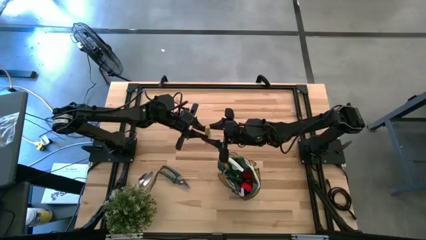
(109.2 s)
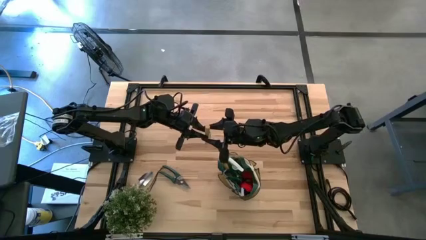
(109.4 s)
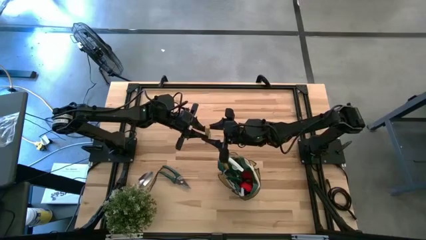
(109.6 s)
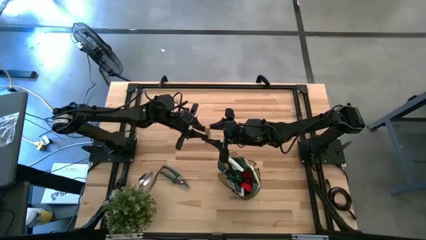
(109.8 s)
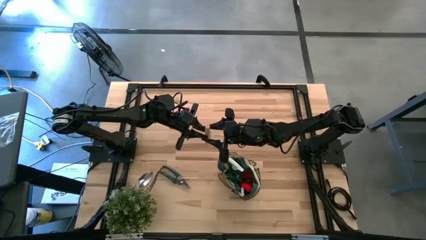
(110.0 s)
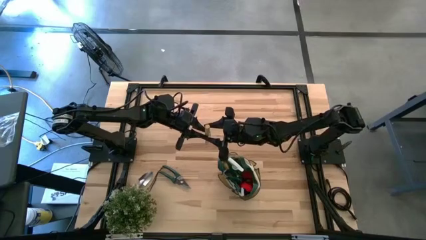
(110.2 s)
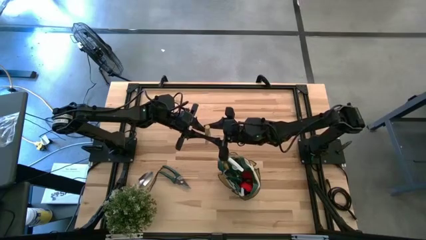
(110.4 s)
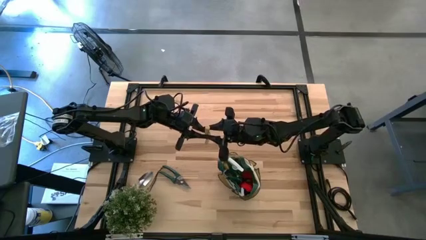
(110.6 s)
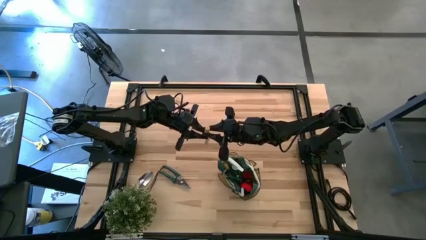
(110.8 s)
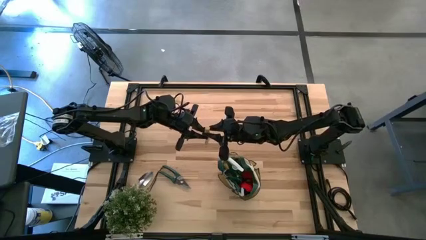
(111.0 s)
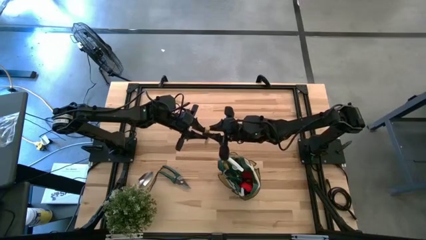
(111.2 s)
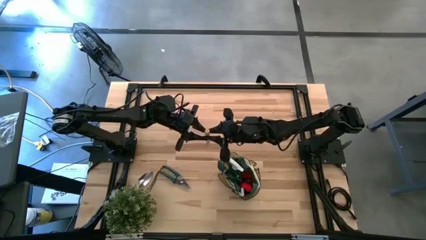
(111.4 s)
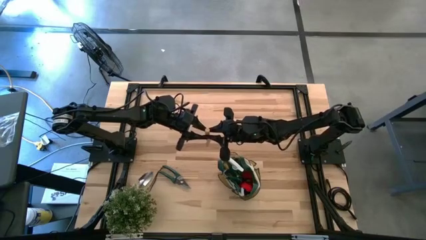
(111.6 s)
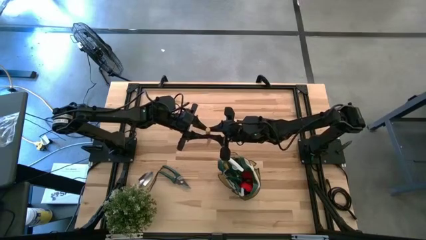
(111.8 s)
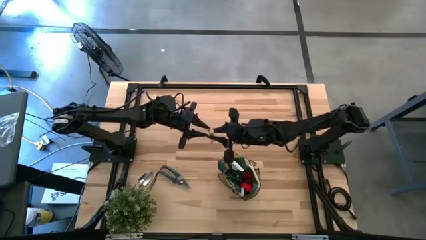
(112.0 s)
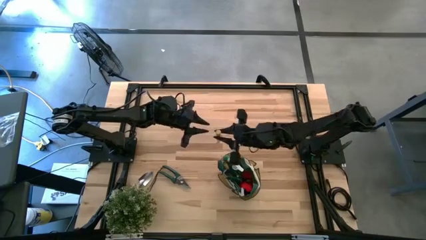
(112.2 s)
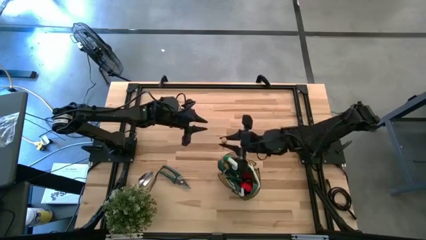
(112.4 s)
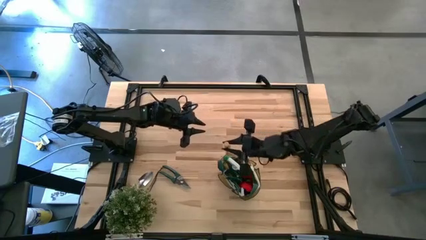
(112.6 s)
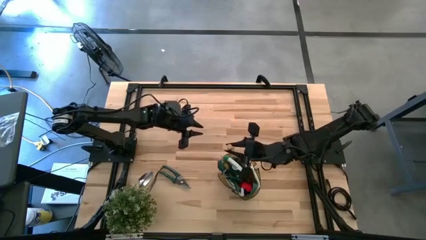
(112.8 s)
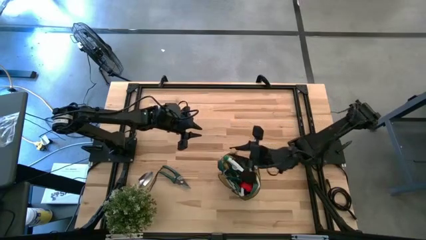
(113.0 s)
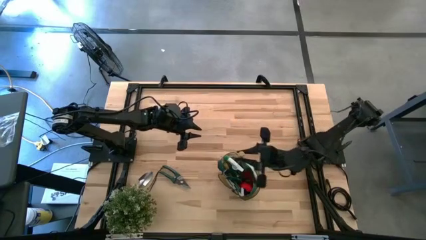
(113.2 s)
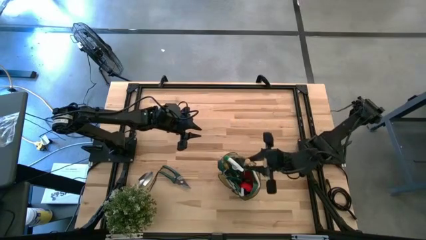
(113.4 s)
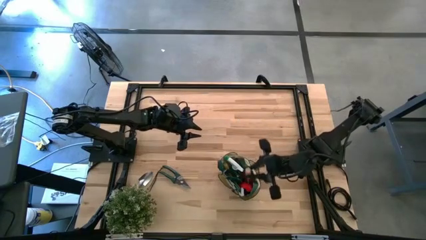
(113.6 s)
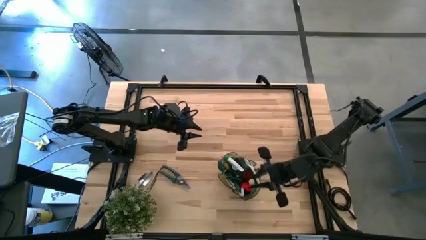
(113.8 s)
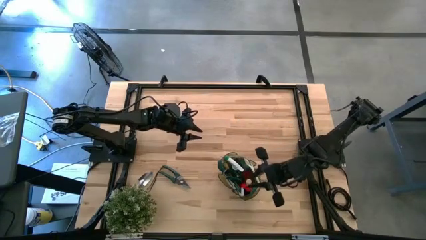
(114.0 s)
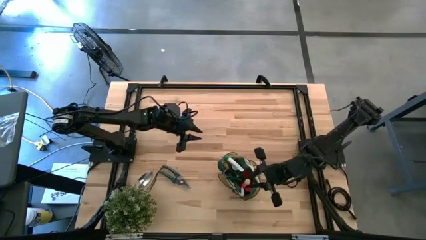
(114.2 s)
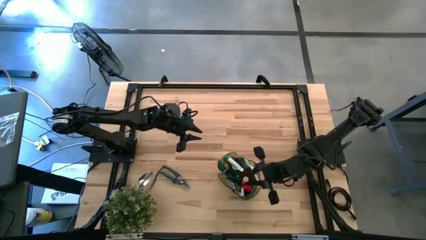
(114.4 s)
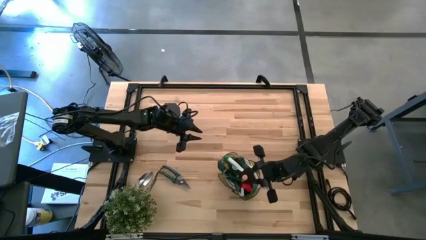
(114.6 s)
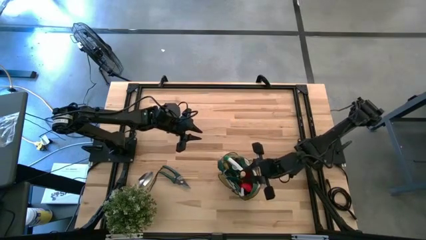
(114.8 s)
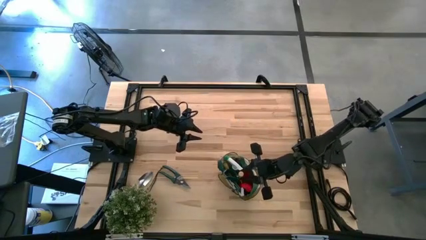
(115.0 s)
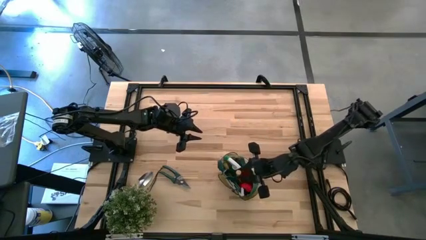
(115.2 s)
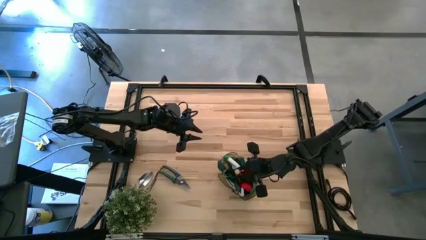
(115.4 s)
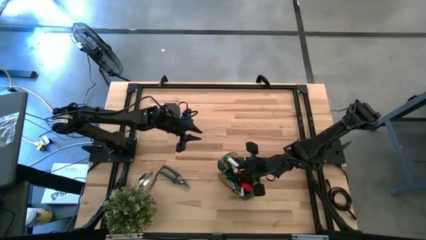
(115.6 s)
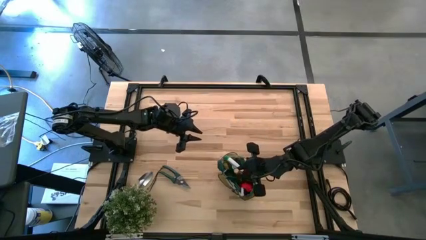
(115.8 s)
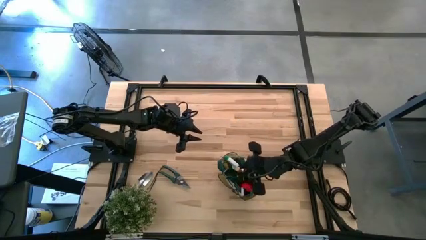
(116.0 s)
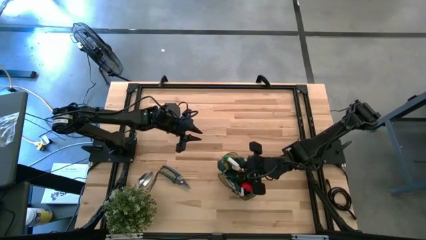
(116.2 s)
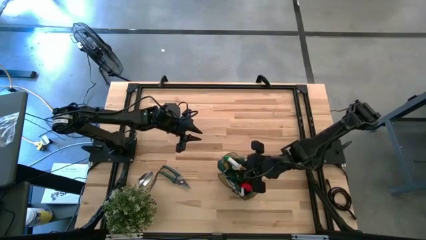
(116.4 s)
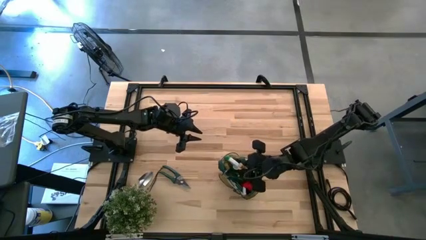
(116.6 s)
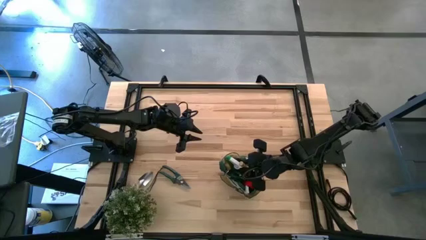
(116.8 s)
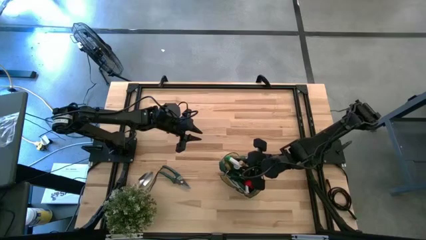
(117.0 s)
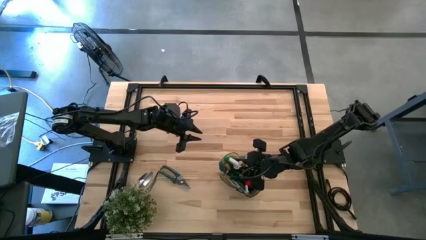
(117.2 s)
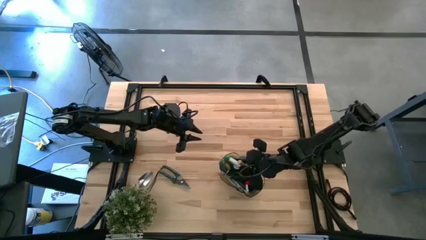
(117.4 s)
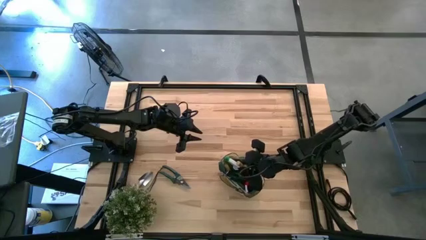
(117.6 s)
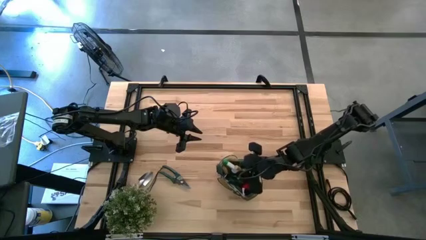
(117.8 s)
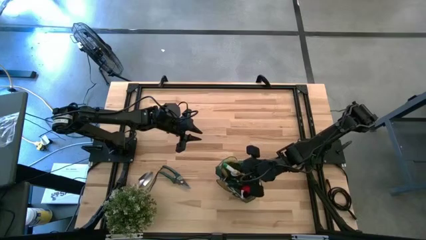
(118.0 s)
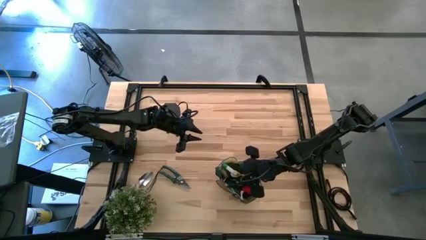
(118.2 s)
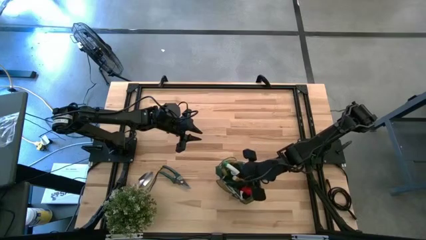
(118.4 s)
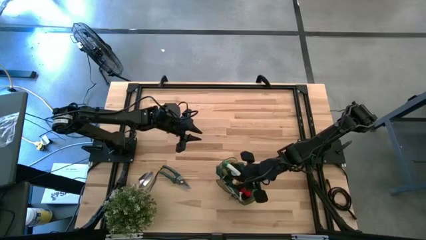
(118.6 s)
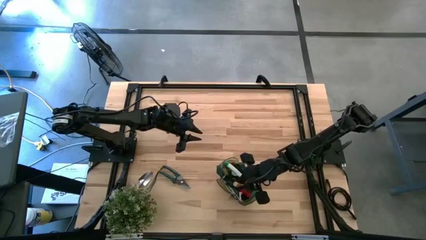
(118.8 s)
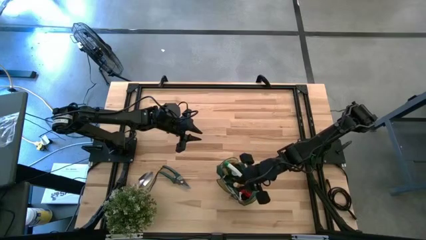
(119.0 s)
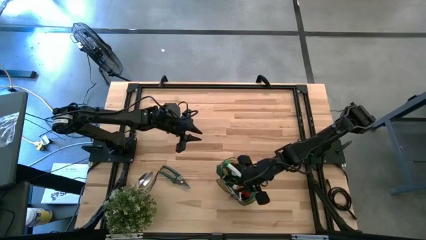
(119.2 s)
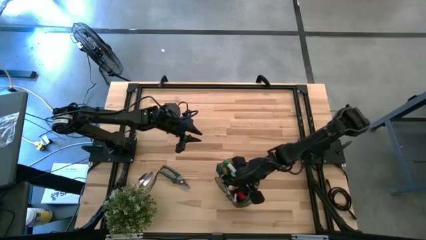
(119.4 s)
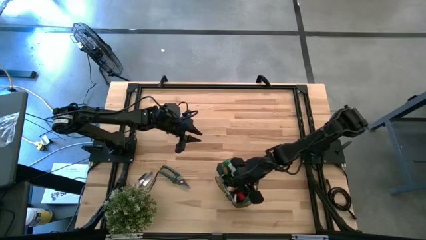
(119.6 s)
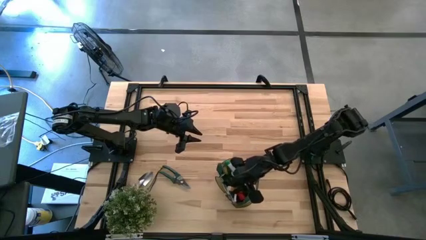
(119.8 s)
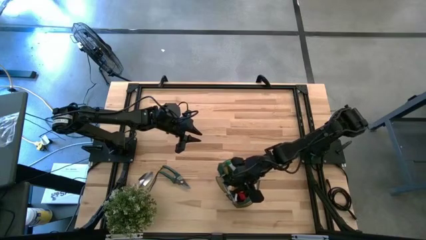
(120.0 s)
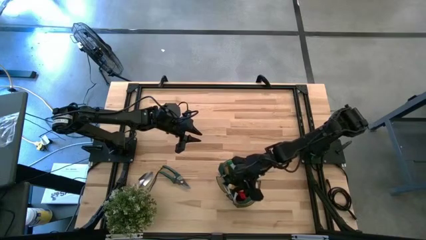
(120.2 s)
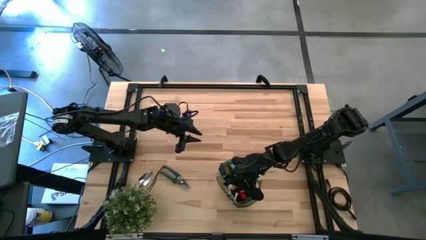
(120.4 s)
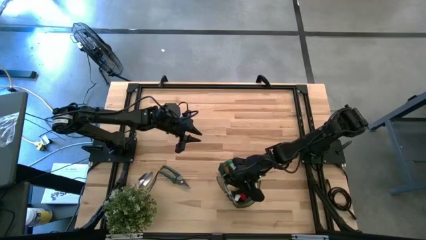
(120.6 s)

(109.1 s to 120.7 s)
Task: Pick & Place Garden tools in Gardening bag
Put the top brown trowel into the green gardening bag

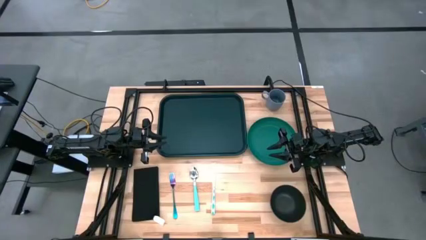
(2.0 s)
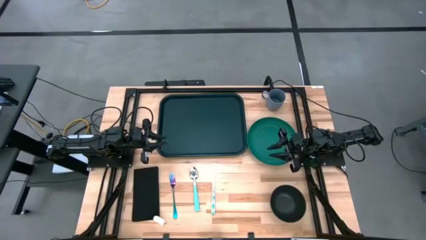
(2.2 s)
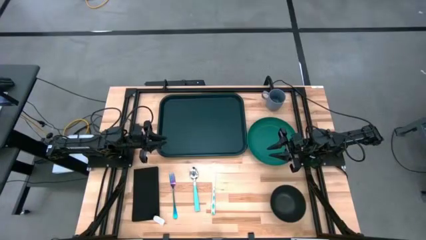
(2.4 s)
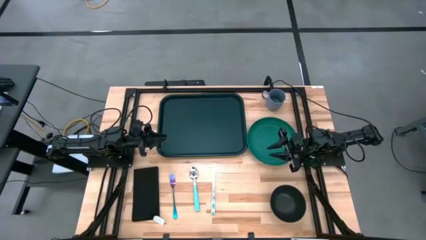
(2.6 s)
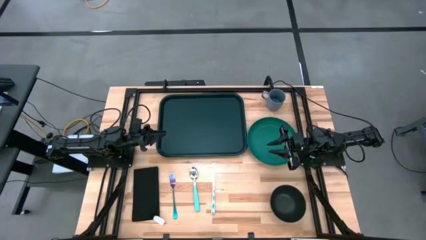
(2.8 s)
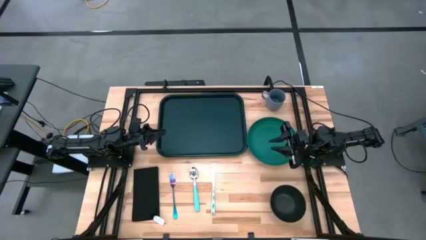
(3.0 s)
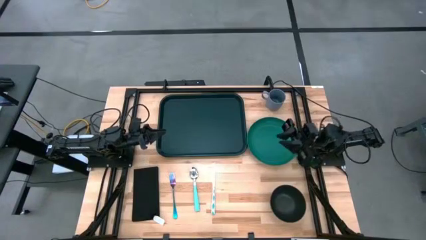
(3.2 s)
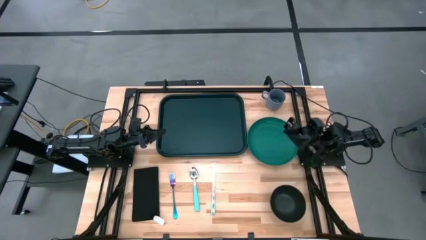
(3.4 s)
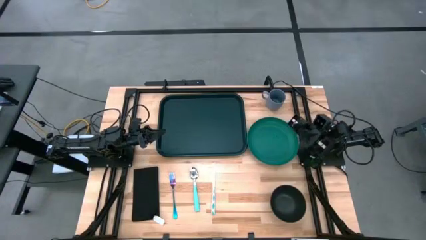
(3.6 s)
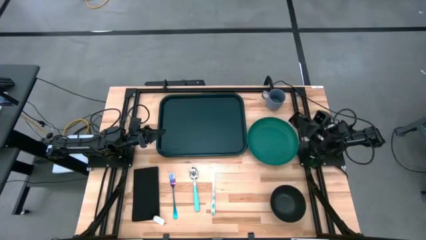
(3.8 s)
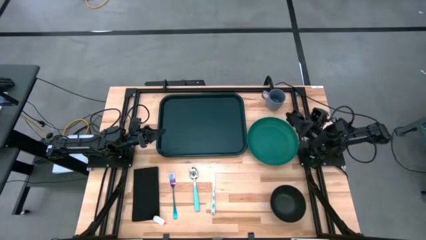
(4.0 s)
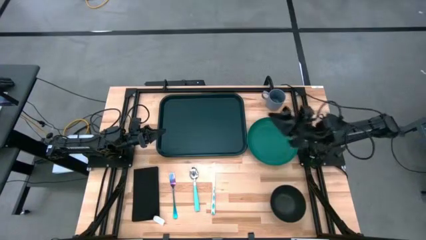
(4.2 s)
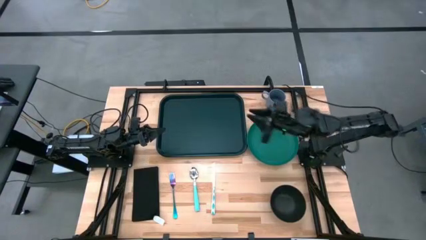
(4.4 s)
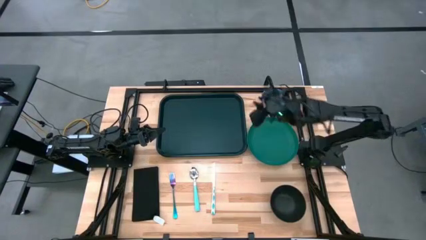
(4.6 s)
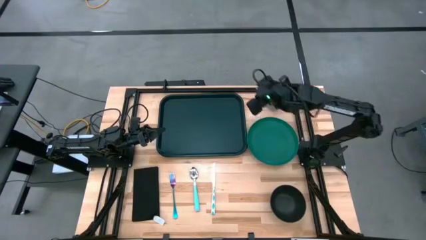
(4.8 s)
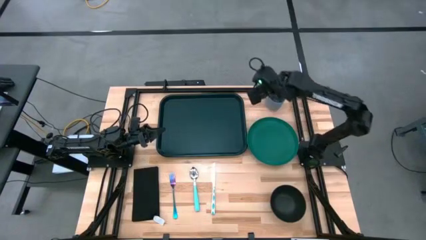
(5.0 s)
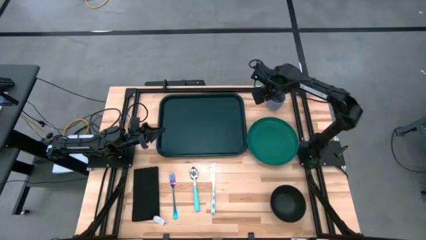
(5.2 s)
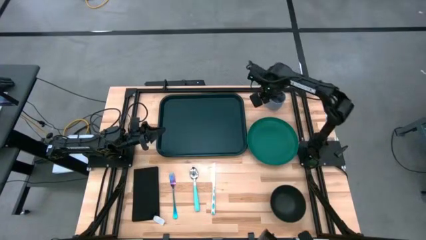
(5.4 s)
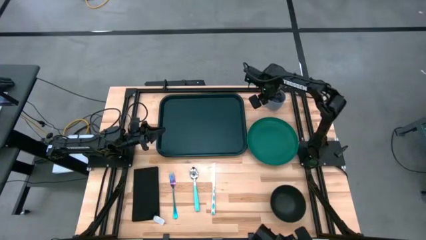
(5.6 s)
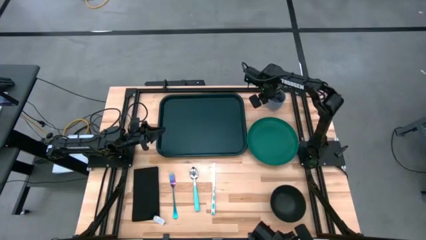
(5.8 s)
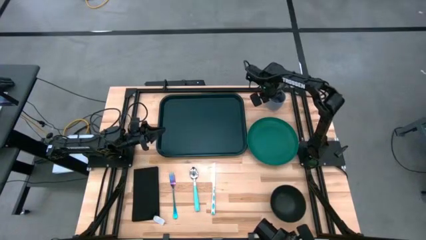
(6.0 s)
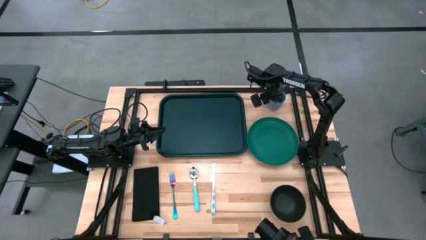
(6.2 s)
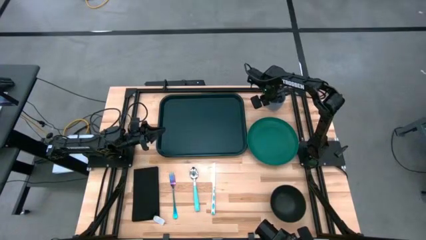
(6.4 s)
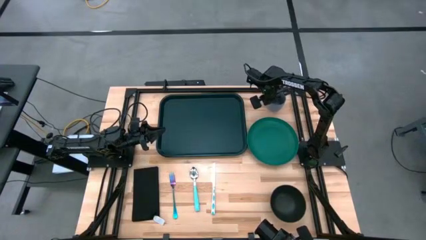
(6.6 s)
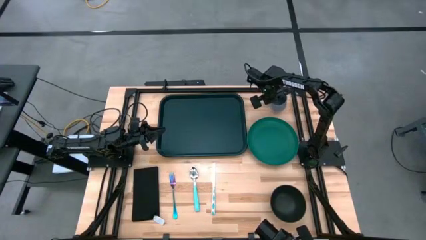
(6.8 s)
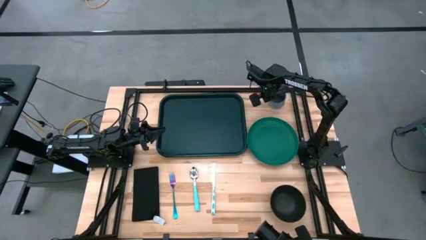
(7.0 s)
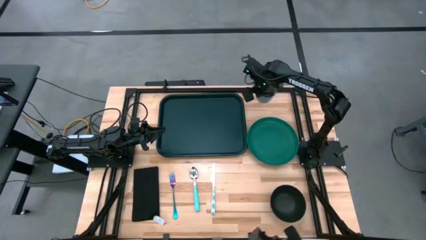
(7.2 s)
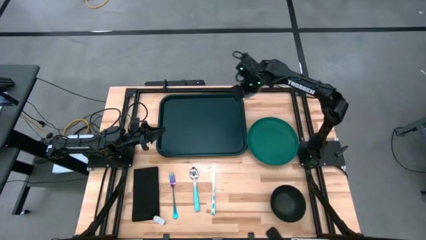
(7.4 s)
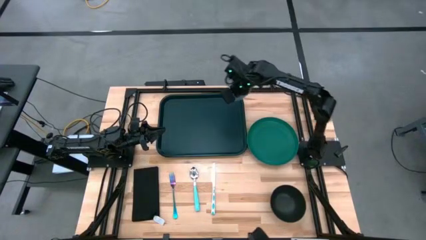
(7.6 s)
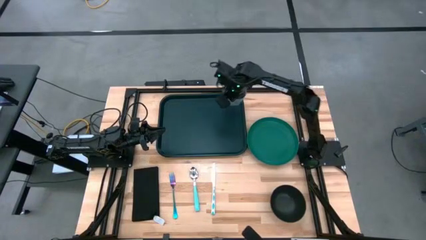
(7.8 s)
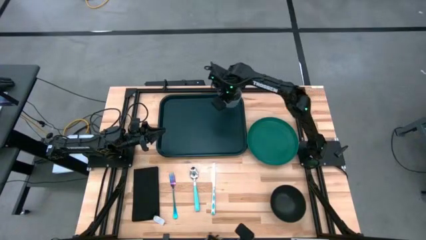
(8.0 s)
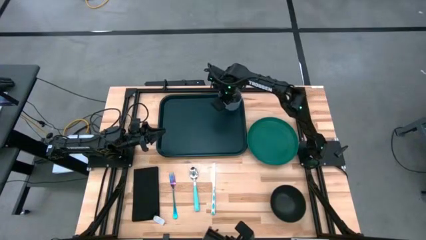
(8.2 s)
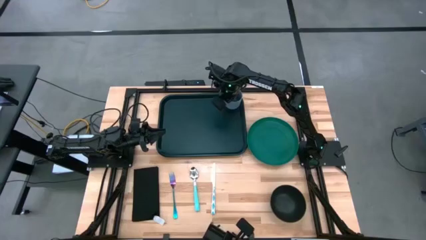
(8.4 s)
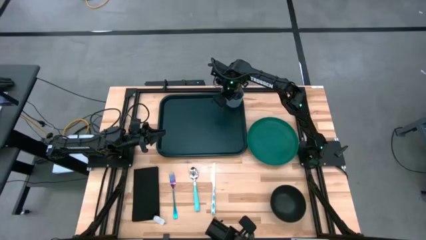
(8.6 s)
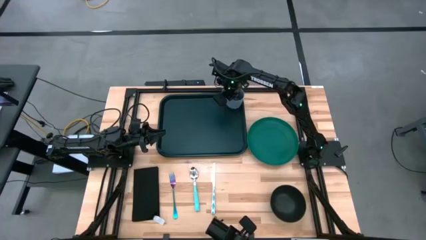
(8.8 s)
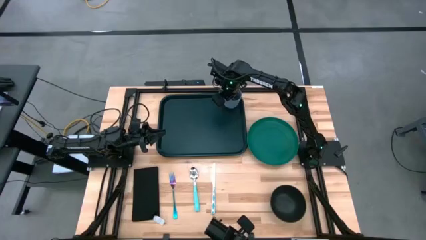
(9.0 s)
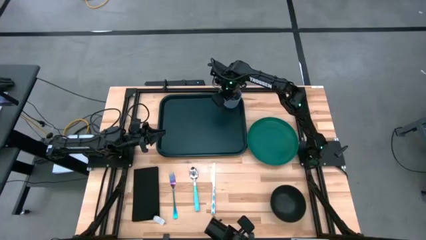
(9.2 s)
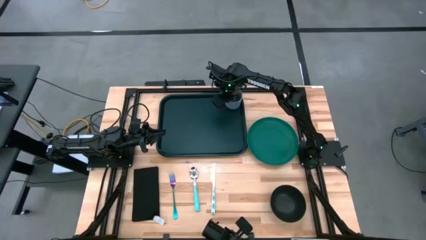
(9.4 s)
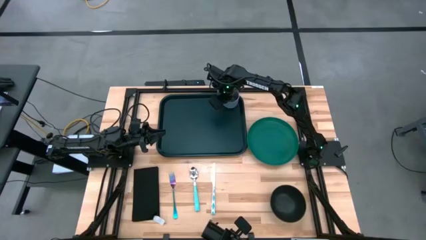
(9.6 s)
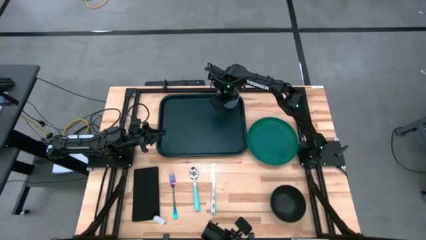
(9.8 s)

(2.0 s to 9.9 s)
Task: Set up tray
Put the blue mug on the dark green serving tray
